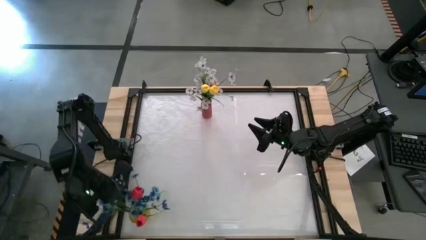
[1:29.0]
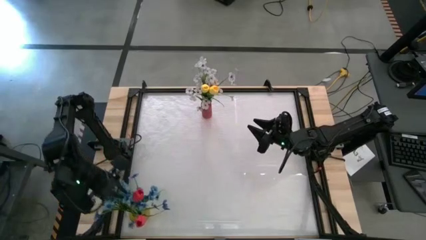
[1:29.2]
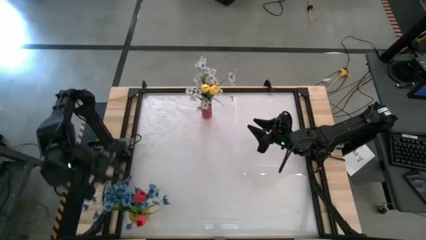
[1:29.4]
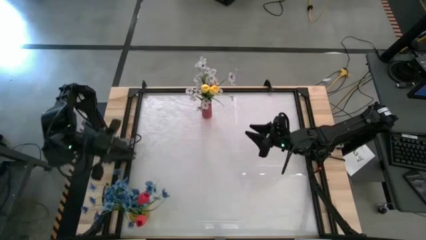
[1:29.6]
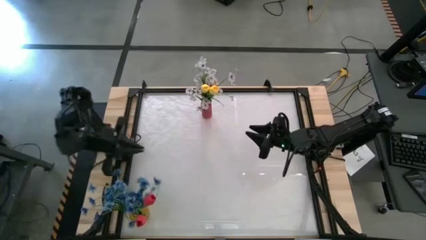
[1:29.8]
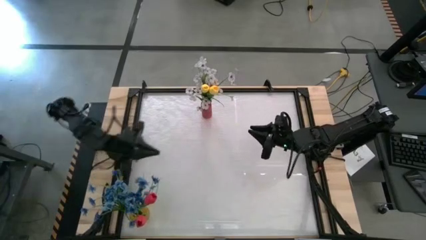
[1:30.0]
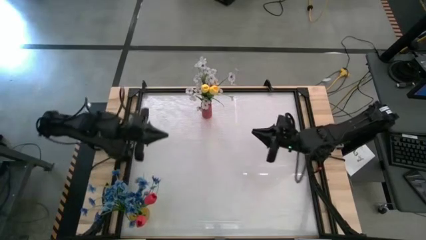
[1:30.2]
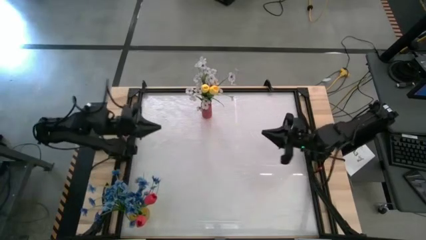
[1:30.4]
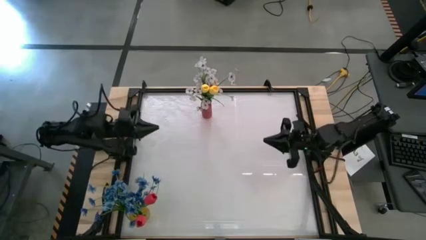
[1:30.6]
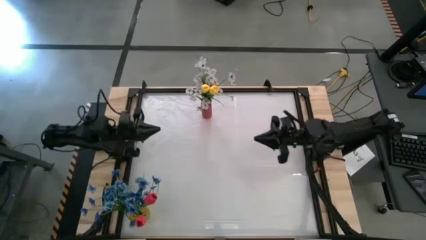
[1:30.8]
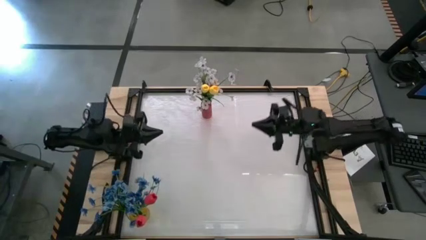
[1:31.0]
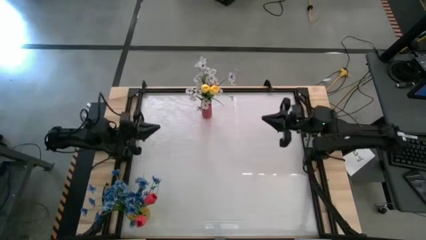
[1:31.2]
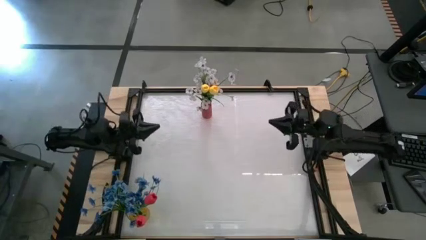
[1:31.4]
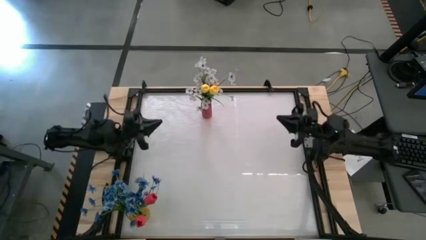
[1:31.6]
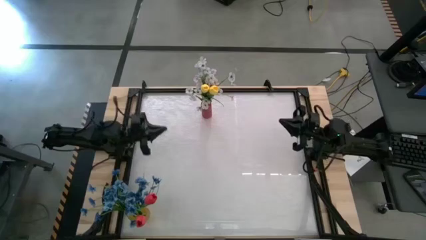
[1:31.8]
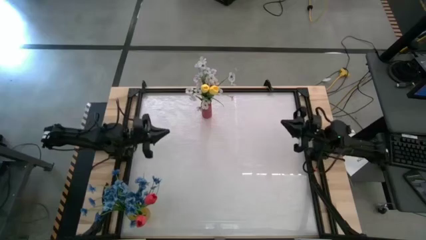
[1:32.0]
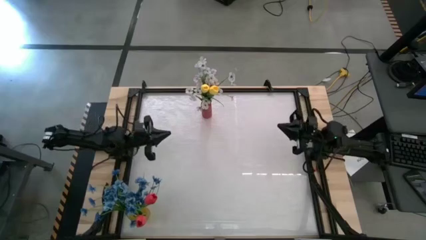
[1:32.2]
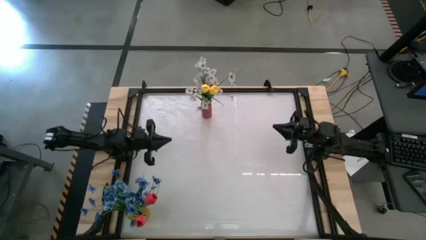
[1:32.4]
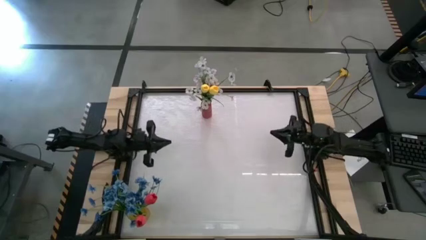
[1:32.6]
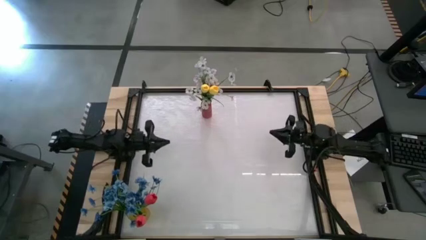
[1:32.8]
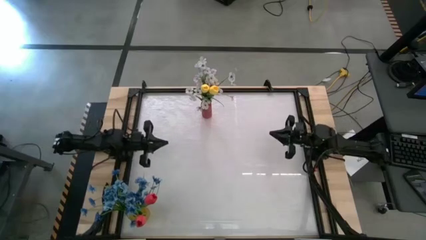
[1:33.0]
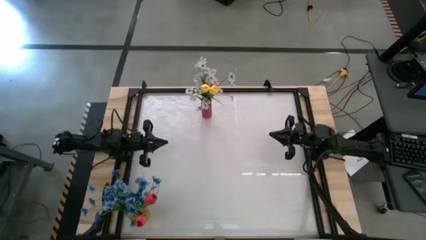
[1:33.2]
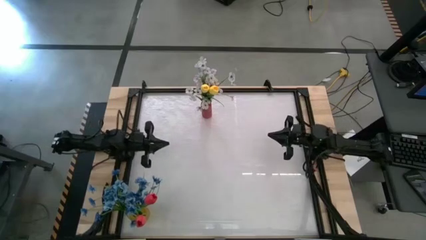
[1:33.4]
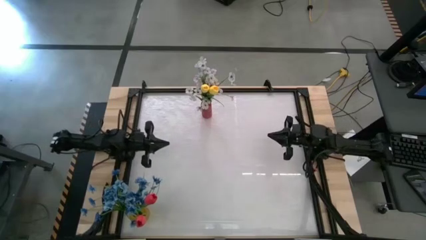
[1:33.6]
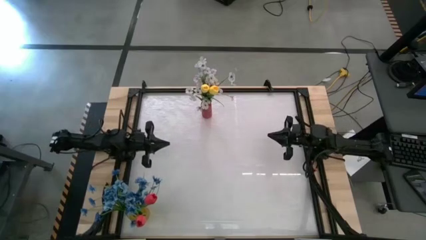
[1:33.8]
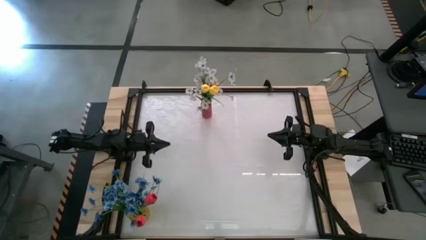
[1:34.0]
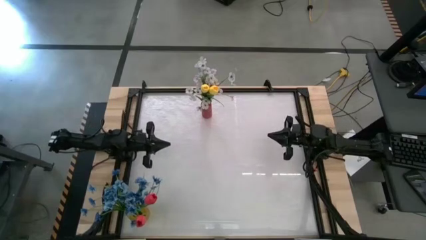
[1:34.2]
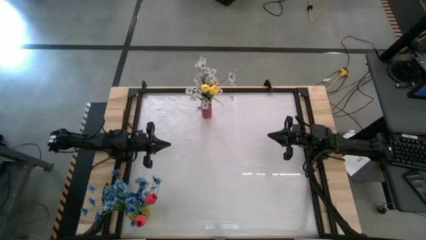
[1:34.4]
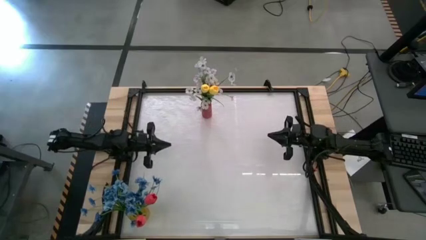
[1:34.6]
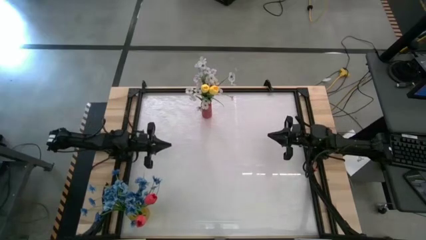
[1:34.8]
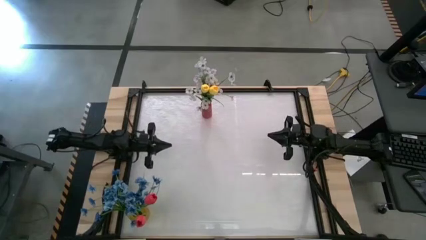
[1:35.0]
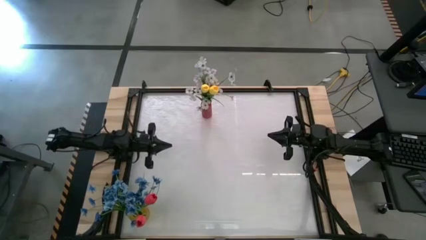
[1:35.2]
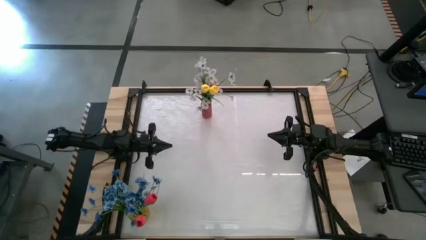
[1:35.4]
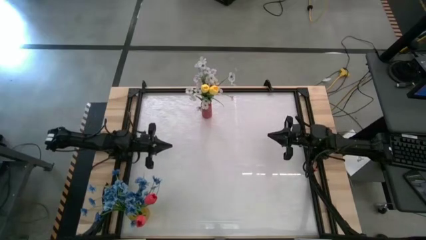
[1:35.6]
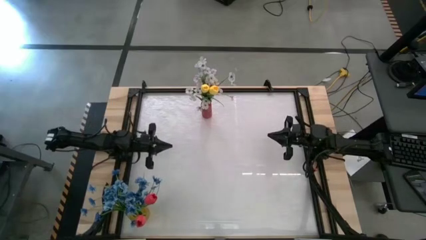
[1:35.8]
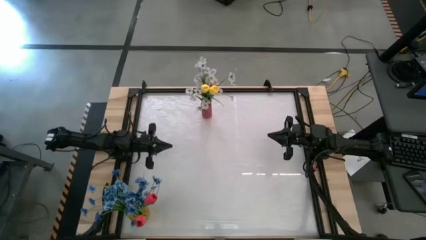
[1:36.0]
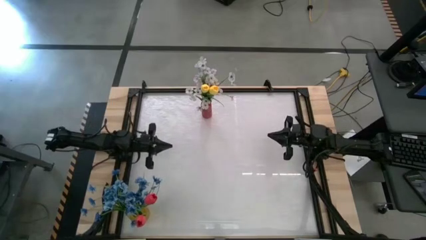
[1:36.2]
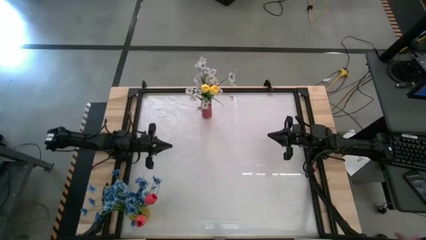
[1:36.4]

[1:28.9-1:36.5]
Task: Sort flowers into vase by color
Return to Home Position

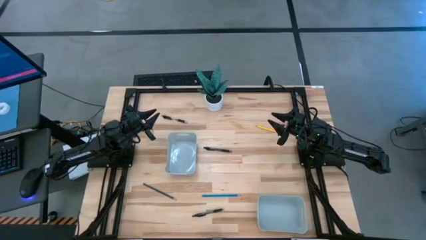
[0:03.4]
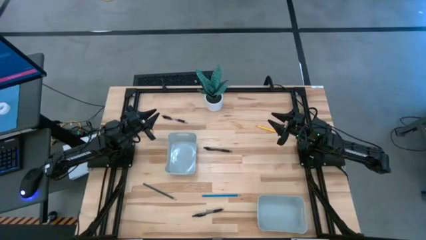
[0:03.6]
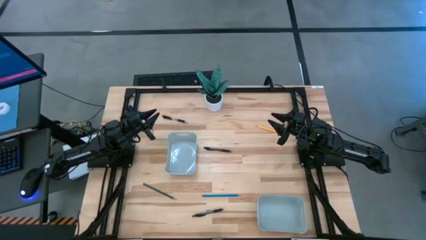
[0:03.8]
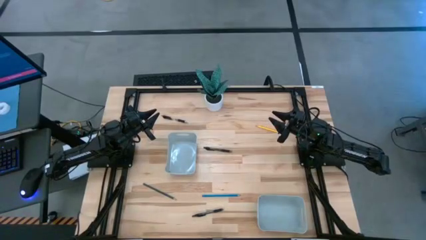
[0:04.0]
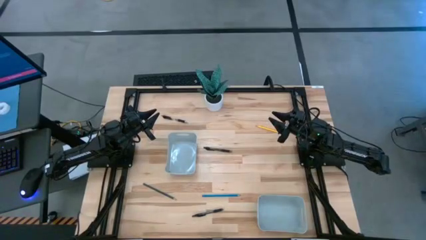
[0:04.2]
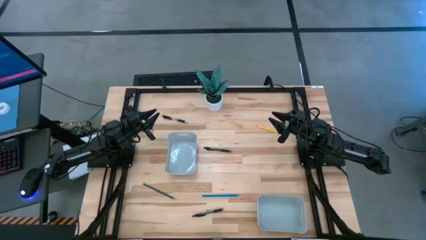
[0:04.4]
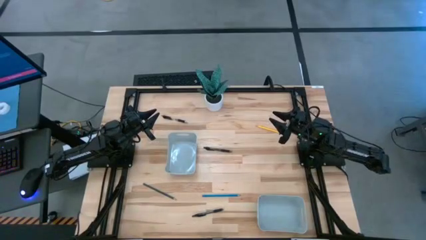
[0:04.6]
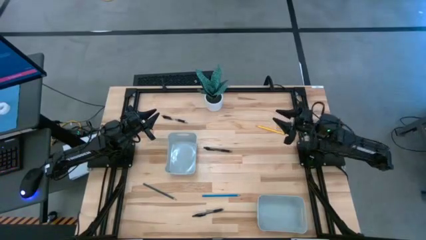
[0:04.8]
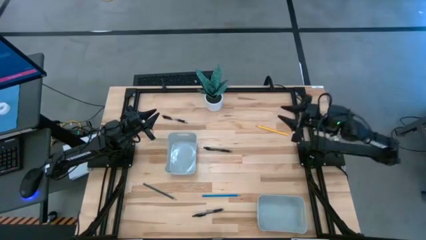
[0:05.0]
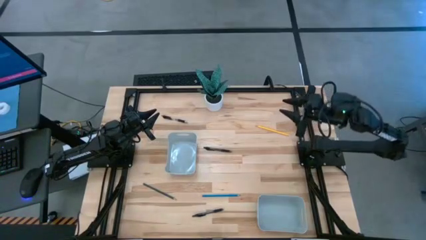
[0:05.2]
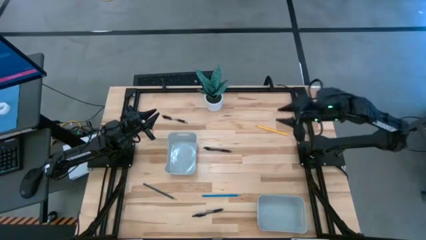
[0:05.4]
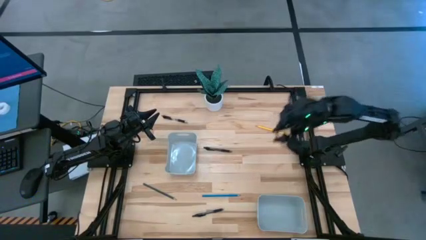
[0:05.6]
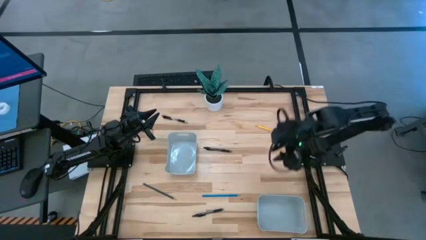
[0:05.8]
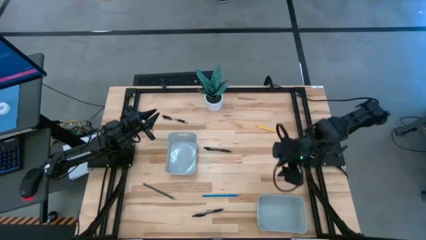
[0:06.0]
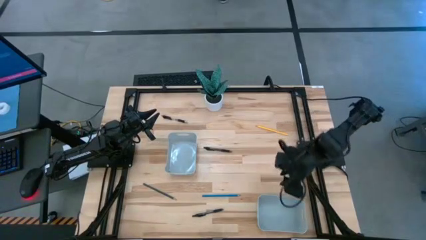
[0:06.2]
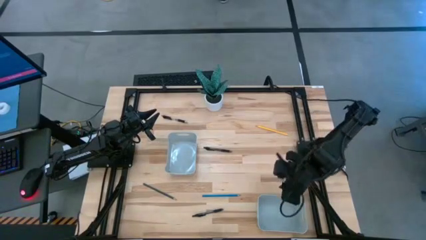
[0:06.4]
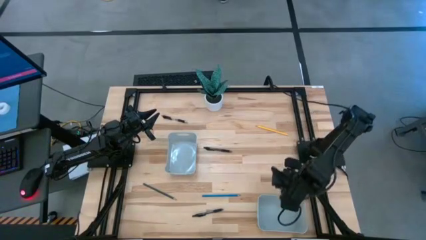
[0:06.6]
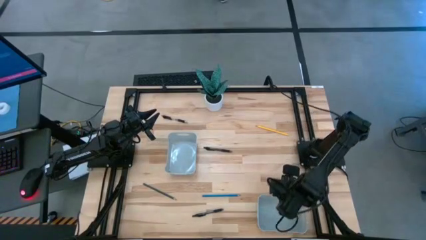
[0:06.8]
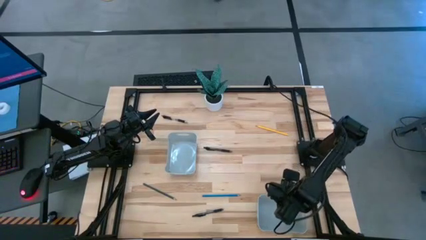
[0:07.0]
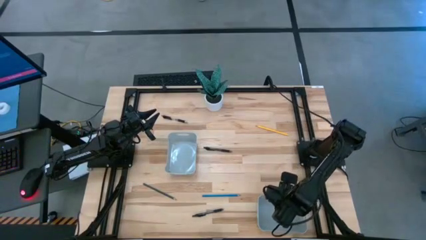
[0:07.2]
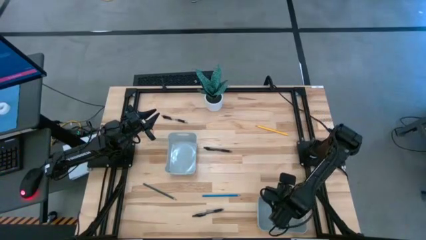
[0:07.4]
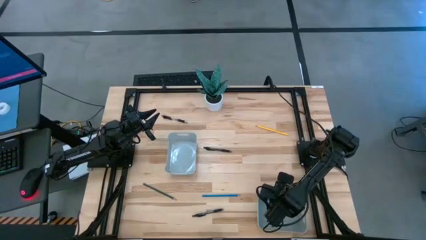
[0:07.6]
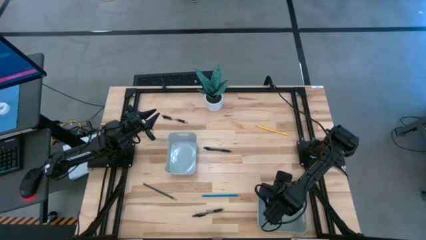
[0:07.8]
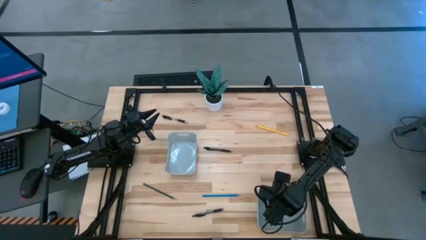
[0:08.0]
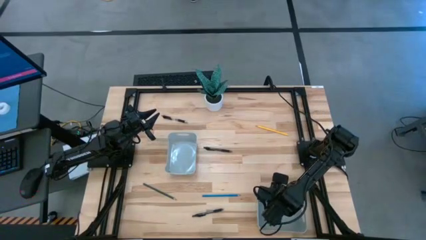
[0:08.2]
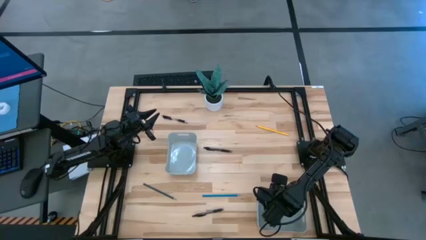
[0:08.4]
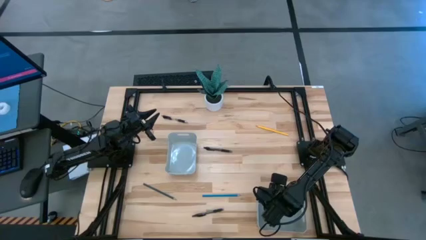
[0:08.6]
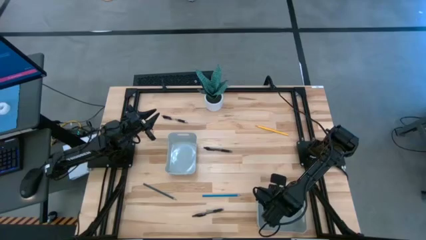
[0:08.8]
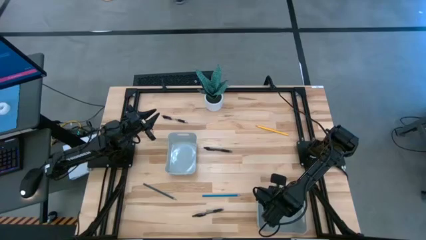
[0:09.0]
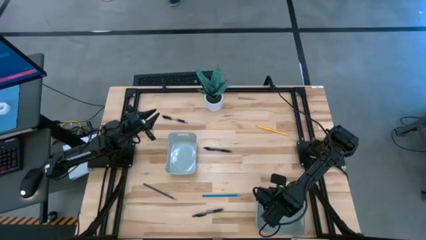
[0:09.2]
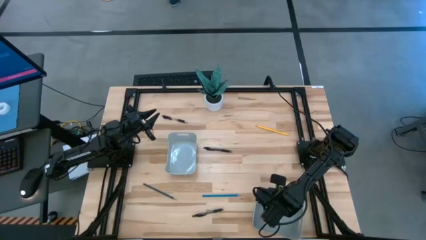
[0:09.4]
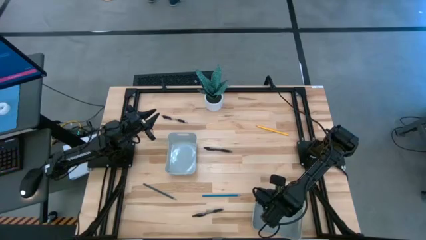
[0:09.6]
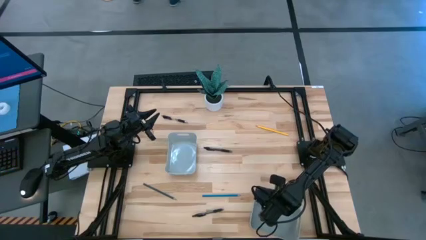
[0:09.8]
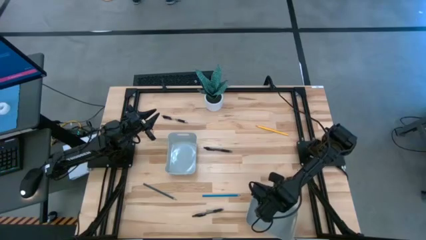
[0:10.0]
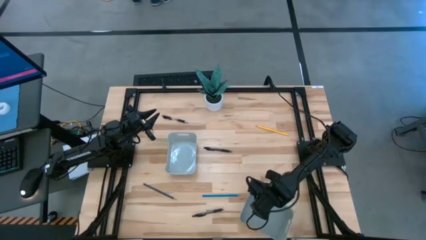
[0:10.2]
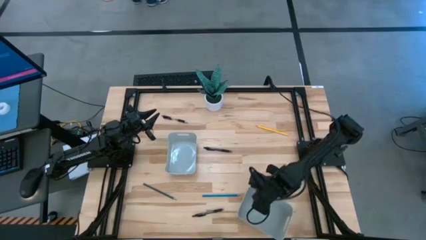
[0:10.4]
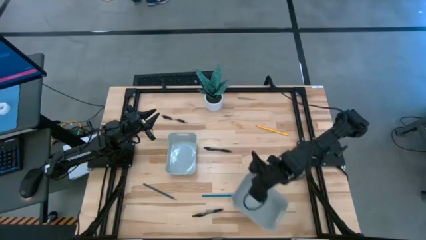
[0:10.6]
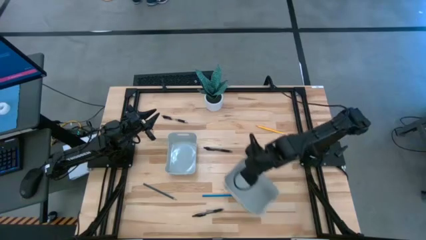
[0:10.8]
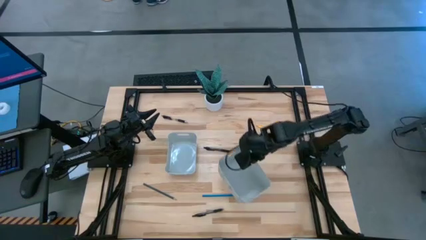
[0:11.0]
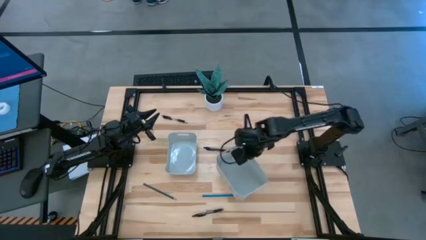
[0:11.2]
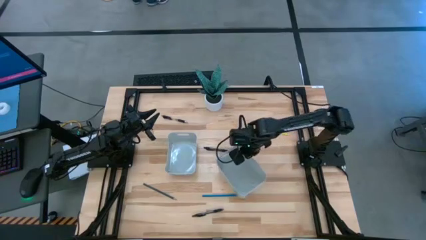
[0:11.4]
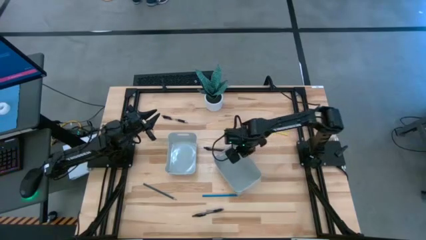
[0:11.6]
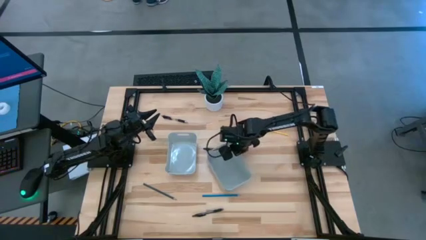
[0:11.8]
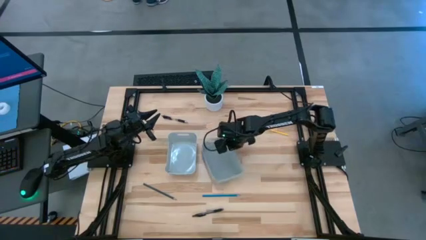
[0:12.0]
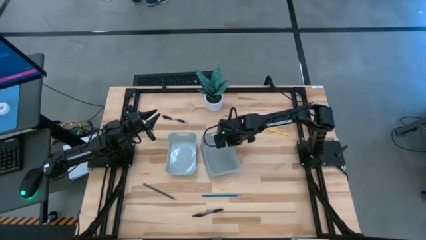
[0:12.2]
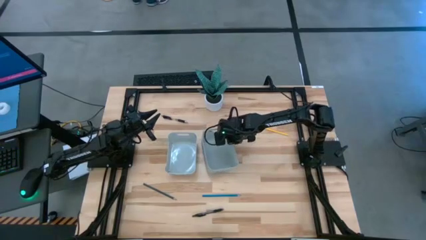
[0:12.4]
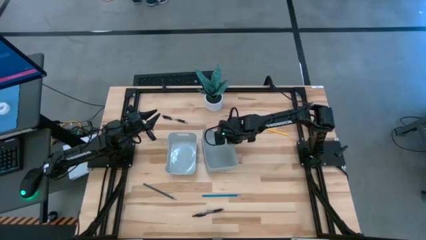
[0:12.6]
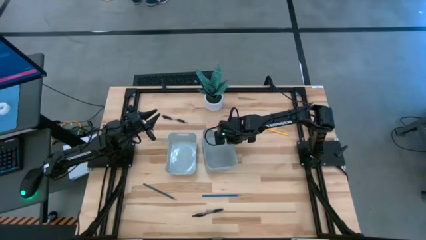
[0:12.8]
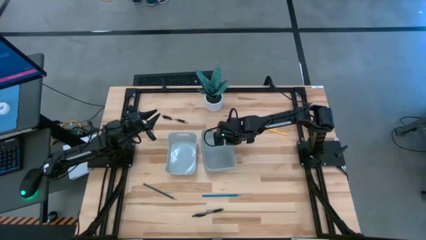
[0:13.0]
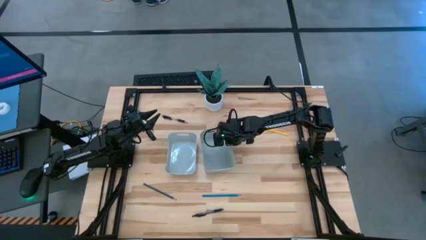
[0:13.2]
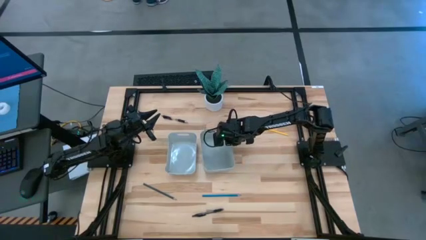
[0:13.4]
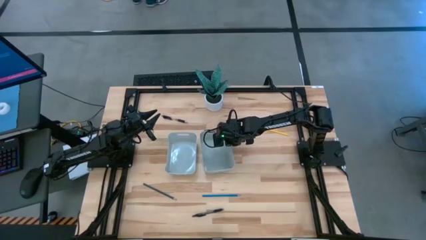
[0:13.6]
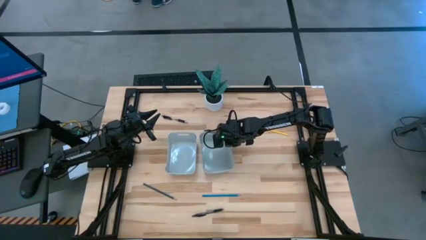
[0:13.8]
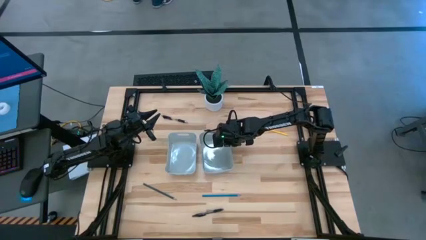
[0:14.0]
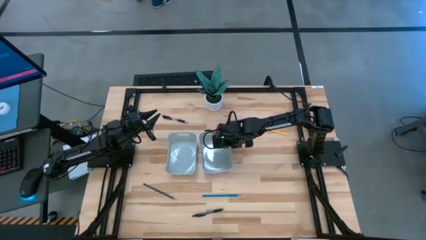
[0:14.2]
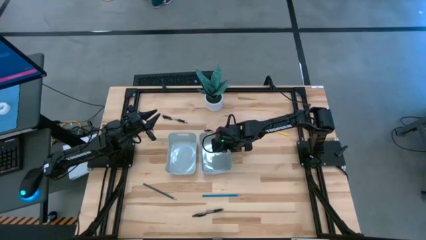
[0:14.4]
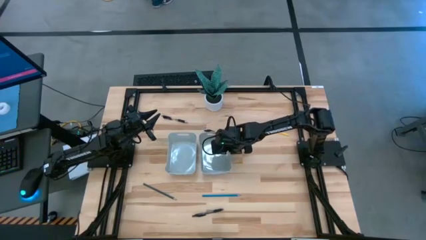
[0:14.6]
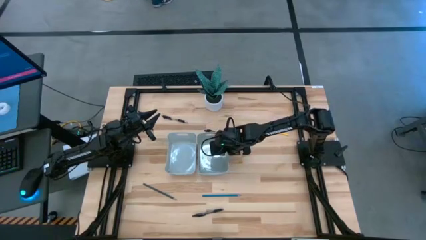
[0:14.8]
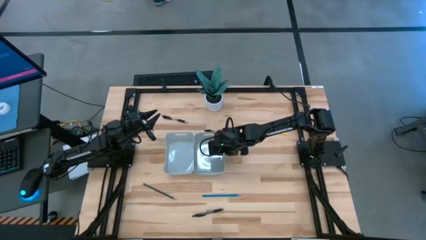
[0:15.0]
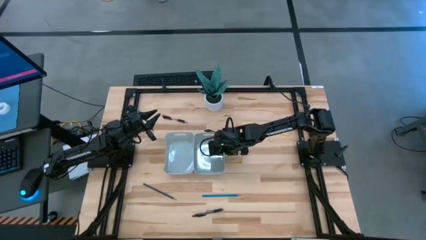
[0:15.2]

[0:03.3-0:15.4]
Task: Sort pens & pencils
Move the bottom gray bin to the middle of the table
